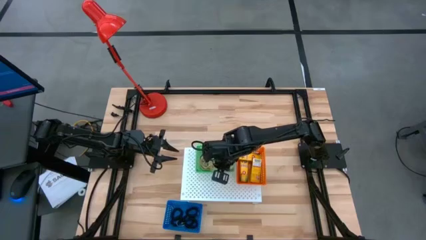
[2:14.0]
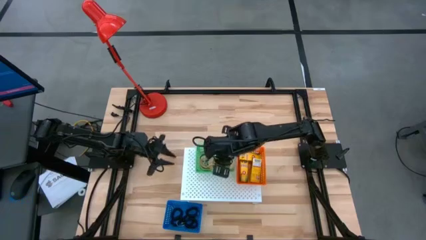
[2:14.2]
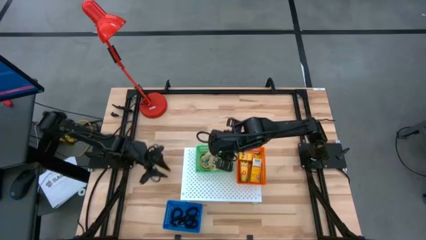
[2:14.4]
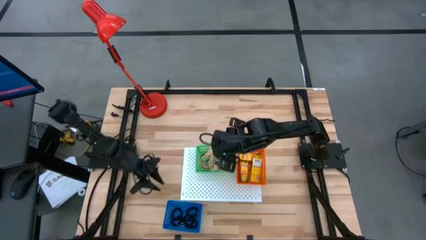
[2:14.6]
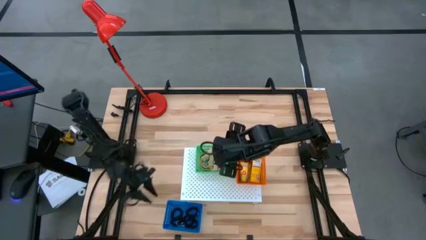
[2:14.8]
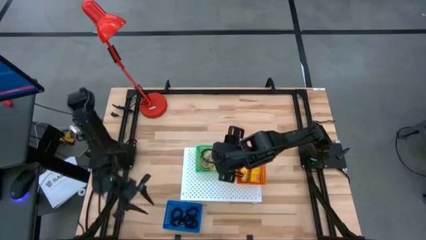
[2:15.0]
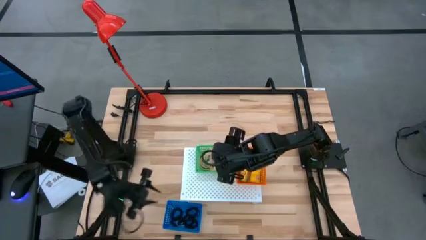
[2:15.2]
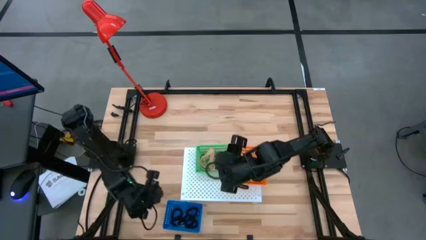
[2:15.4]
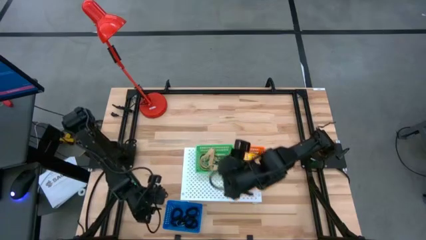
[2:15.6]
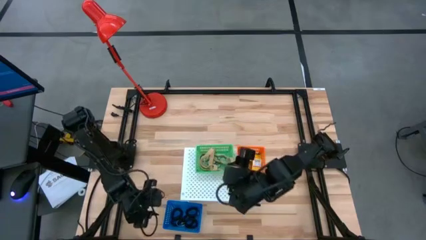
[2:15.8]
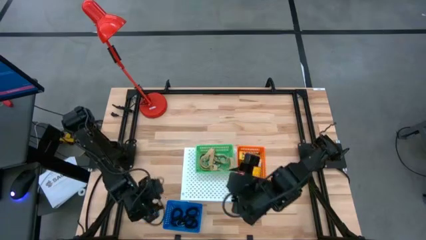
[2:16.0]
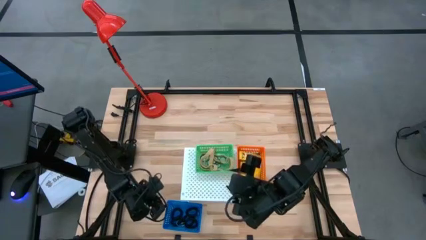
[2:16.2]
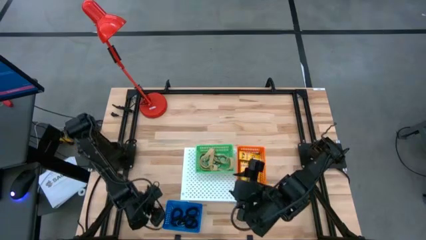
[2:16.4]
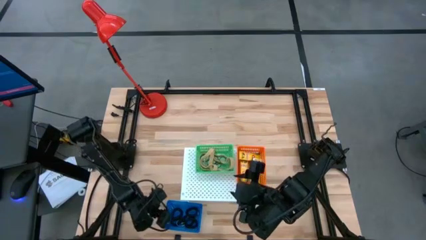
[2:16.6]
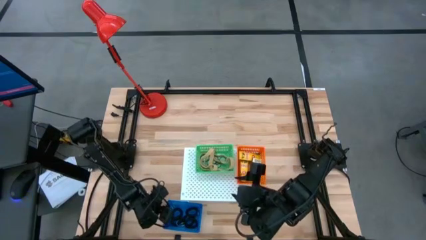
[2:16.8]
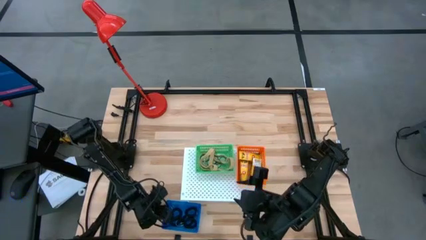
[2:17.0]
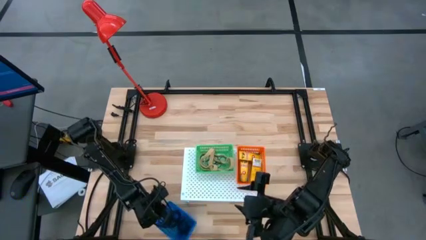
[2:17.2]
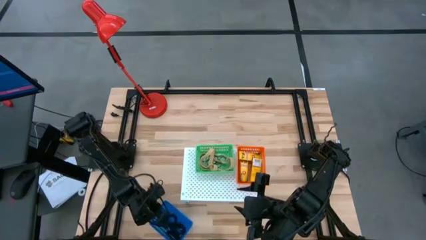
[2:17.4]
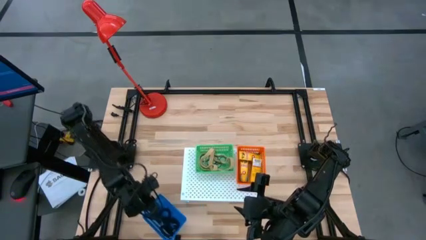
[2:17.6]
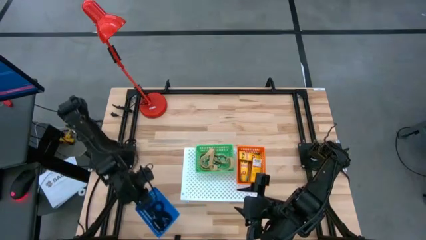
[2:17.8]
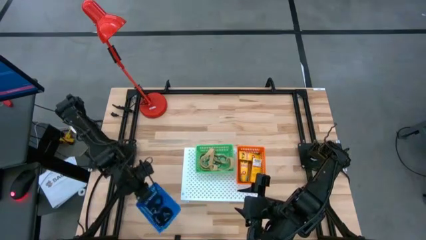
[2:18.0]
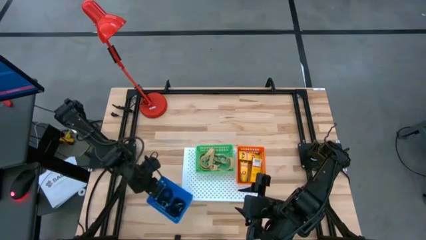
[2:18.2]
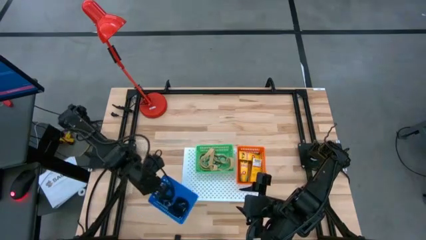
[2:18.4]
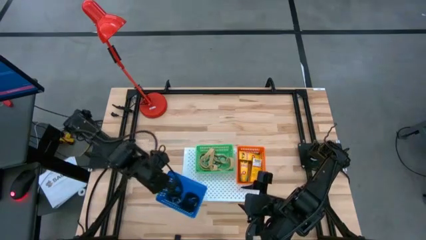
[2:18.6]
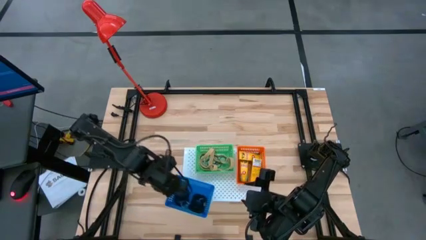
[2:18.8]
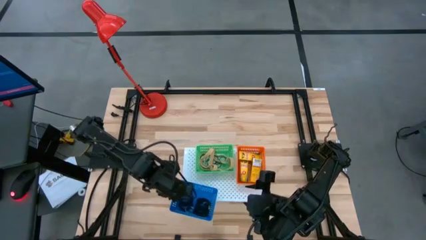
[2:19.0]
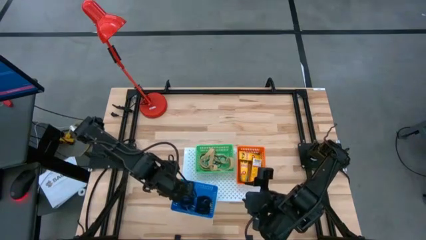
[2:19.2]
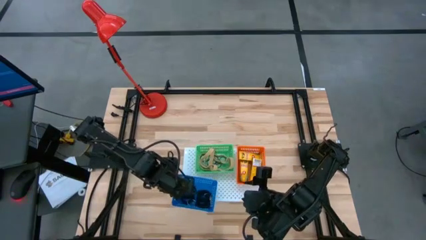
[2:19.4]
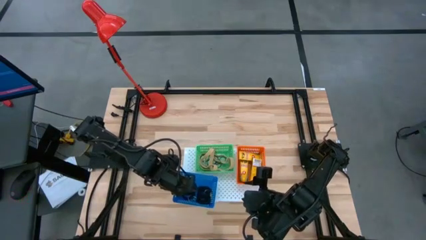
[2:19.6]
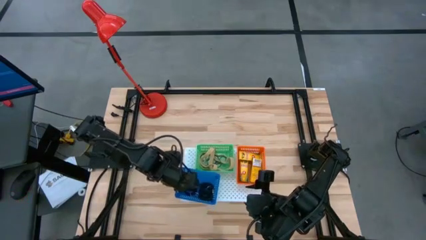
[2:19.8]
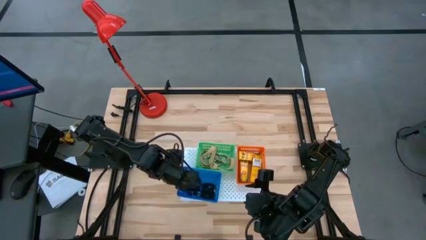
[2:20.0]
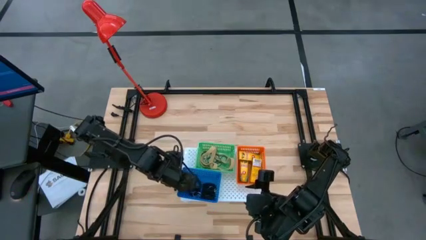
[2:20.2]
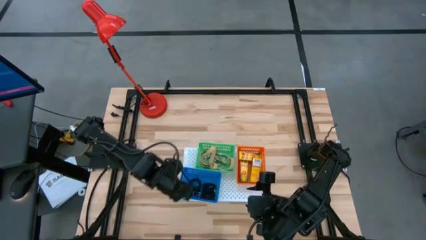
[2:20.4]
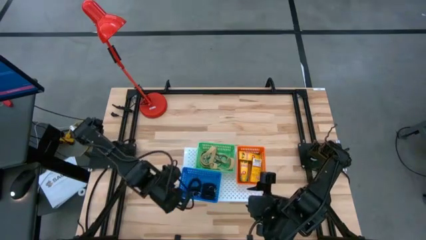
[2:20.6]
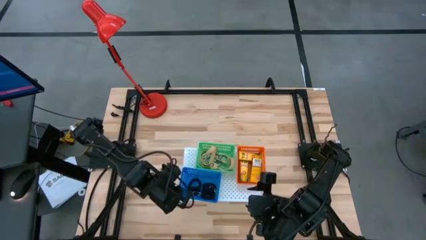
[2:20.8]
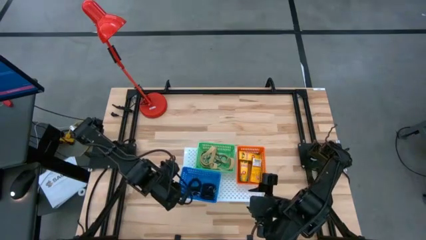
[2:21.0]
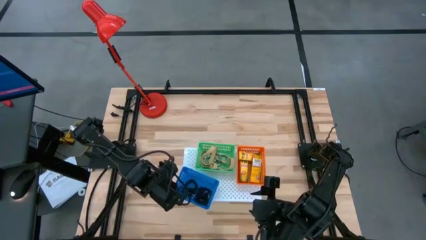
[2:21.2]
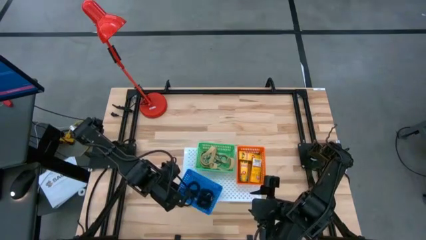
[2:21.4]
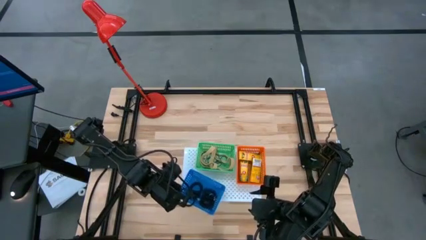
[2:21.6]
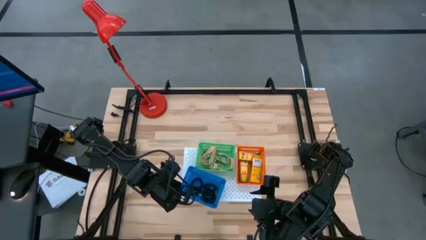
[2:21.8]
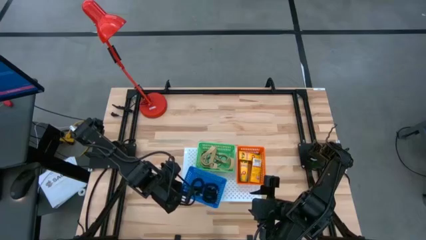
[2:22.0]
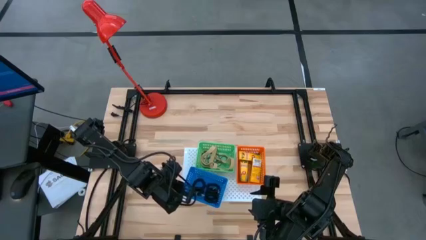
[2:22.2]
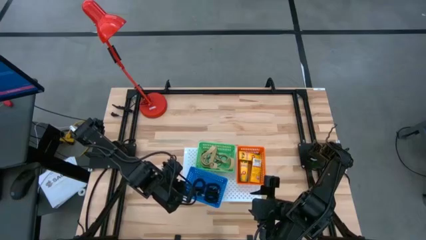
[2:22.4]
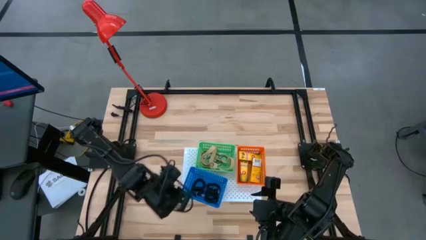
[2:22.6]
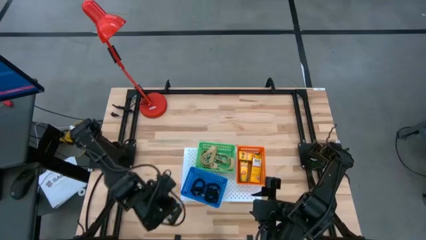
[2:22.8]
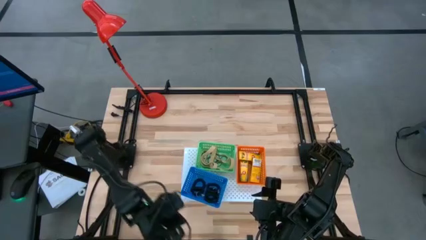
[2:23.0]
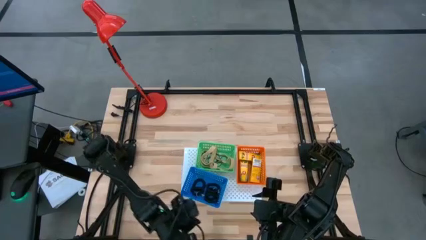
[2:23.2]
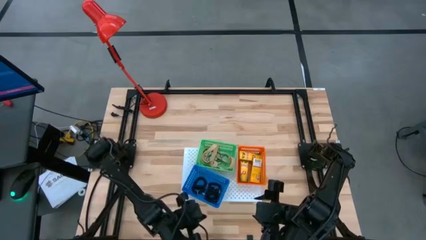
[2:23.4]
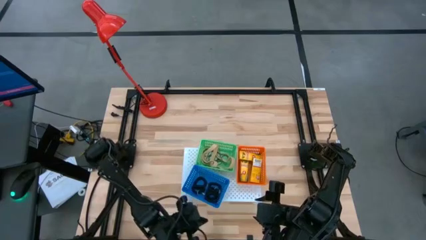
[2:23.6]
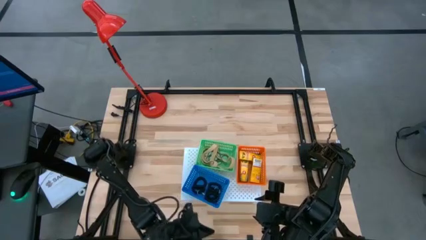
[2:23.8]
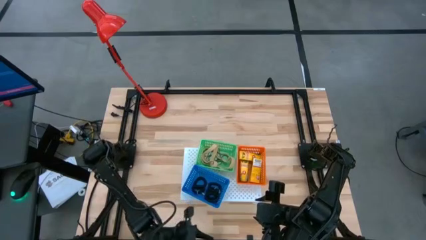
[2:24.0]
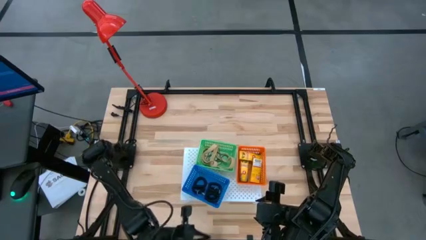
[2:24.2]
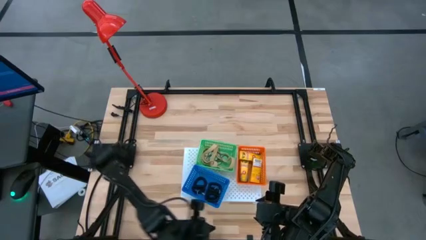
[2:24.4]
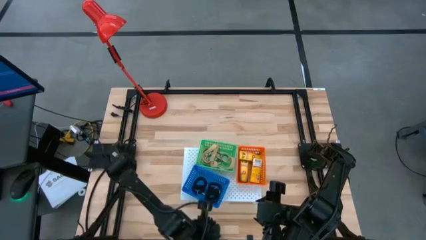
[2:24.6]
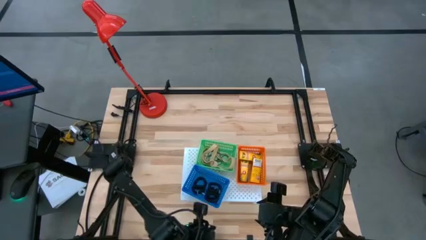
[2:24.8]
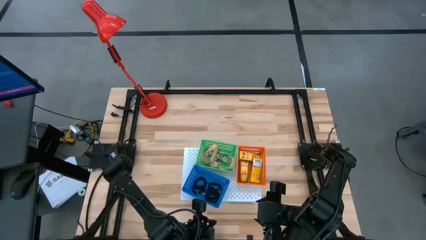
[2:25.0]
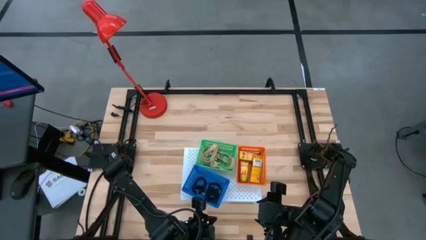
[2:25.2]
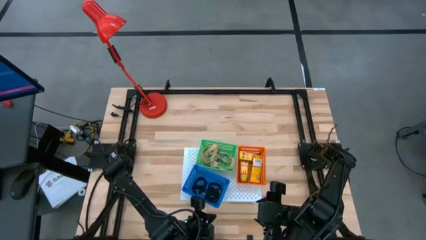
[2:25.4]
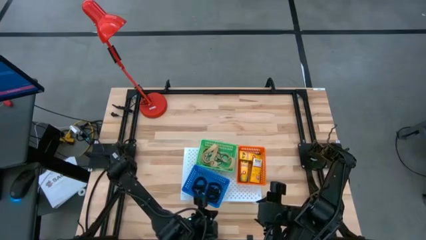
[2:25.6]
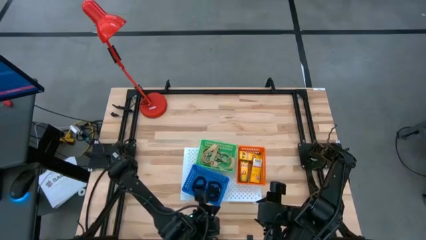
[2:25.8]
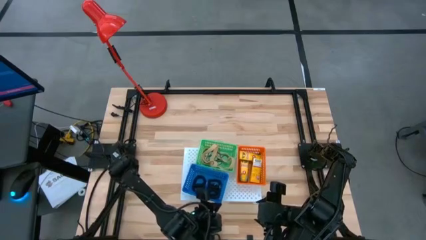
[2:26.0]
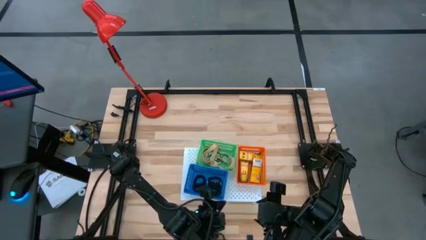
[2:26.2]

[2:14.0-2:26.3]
Task: Pick & Place Office Desk Supplies
Put the blue bin on the shelf
